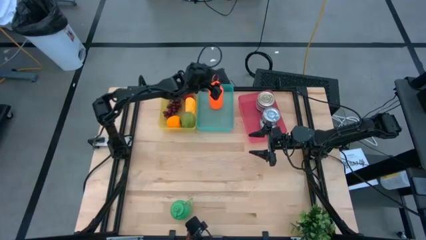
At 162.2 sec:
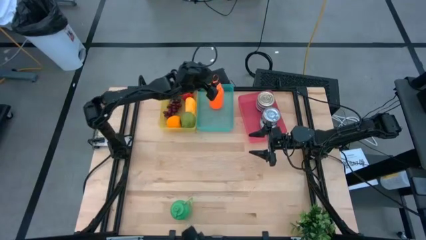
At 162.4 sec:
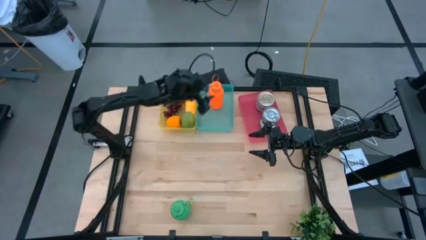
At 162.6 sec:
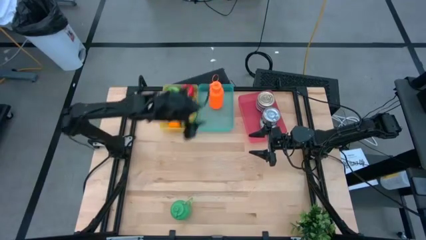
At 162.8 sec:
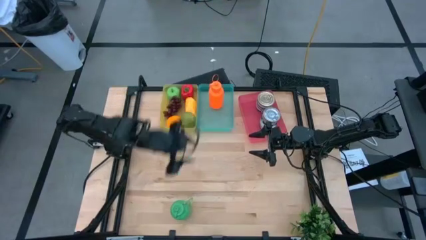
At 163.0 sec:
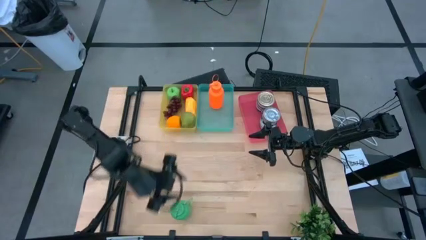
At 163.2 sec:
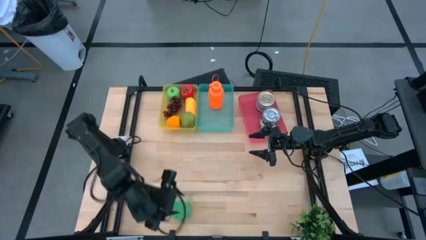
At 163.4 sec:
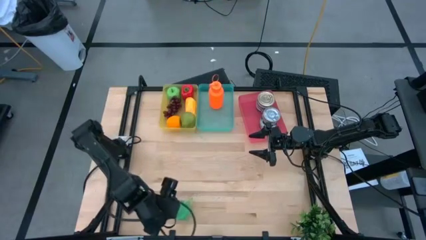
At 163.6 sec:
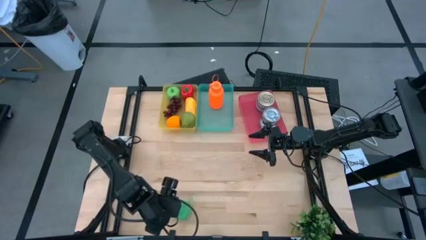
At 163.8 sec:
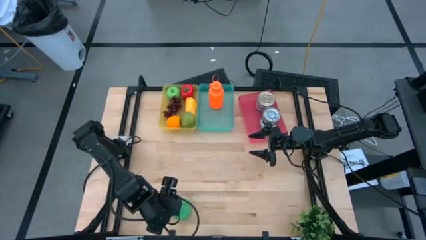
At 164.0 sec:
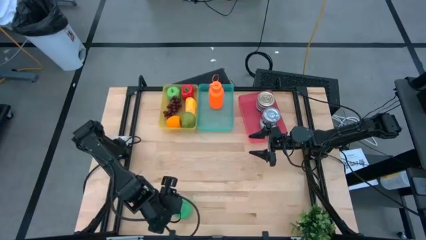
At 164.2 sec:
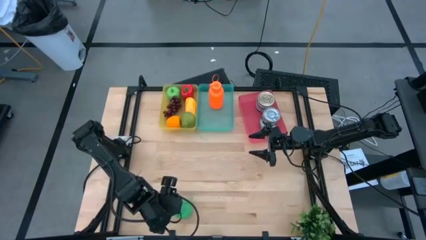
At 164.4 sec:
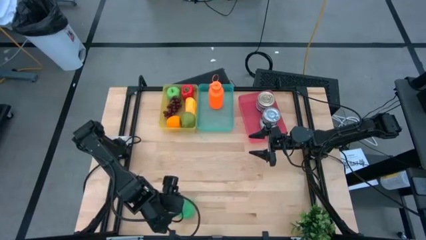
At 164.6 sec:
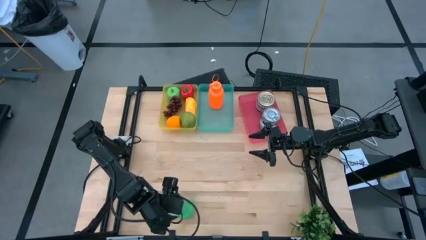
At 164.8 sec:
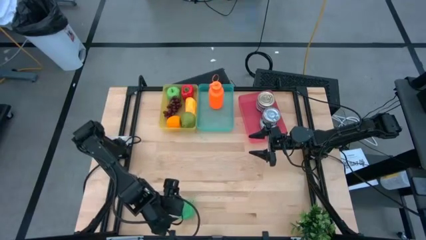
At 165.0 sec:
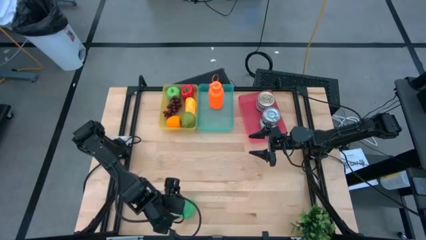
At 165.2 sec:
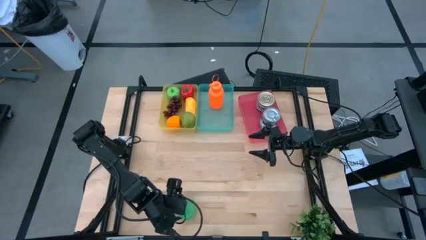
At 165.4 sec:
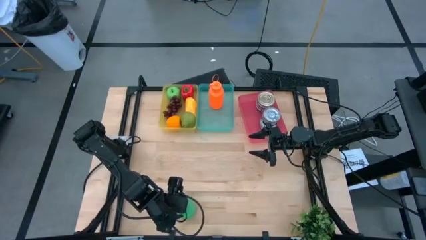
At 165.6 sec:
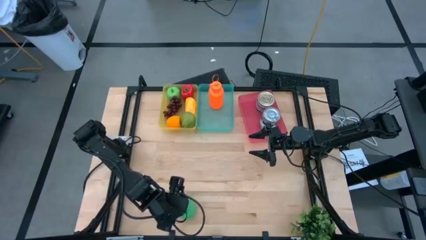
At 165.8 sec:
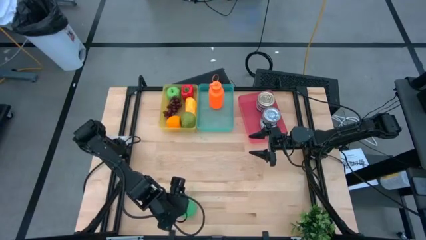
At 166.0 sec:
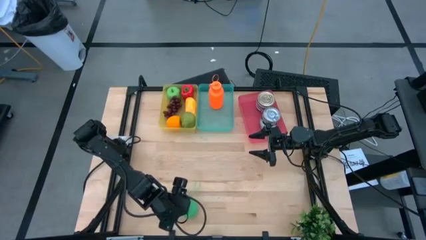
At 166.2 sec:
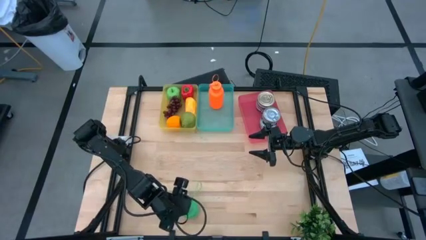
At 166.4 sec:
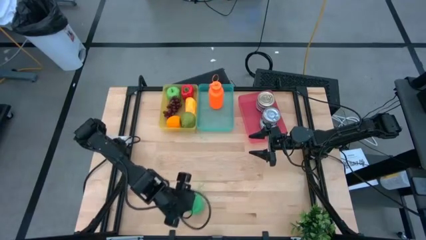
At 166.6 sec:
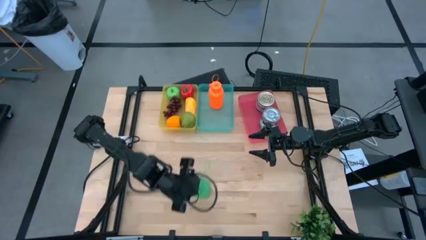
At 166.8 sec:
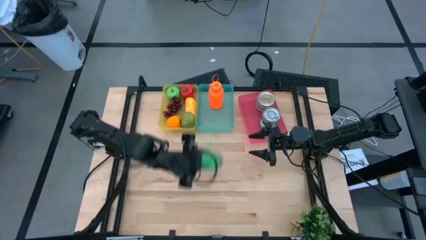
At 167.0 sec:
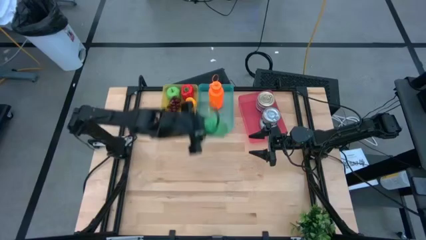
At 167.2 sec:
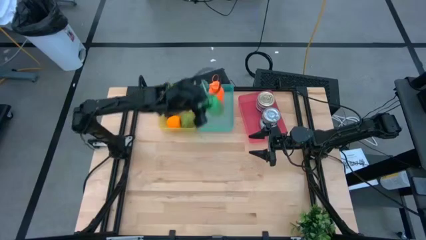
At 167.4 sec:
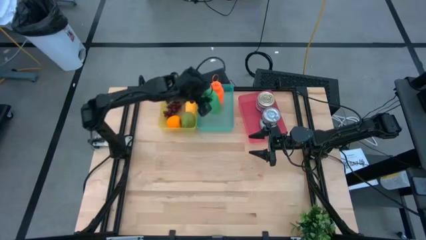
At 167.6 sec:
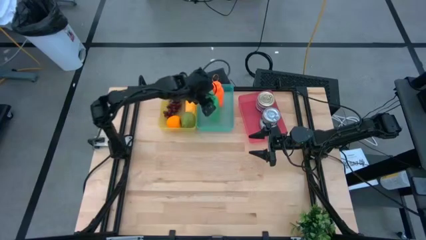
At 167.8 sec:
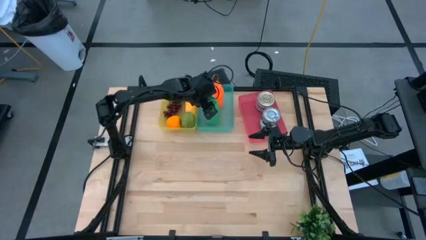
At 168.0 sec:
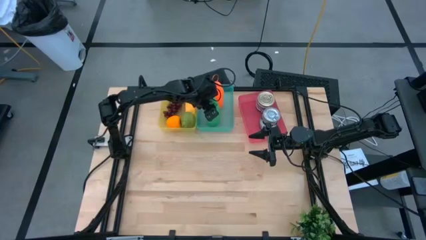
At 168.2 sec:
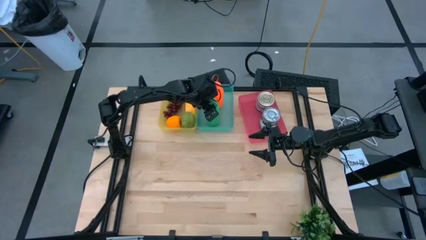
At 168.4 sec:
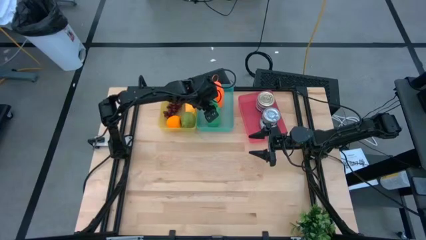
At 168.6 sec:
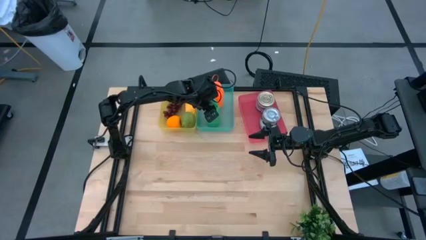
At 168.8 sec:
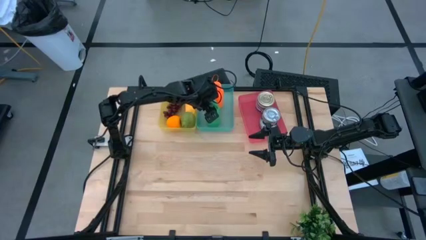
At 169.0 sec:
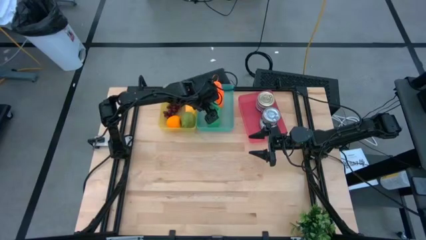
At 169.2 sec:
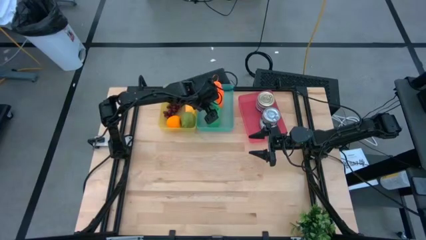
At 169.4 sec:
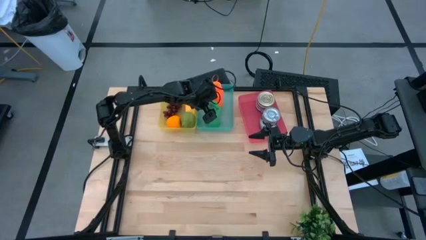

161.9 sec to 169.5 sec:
Task: Pick & Place Food Item
Put the green tumbler into the green bin

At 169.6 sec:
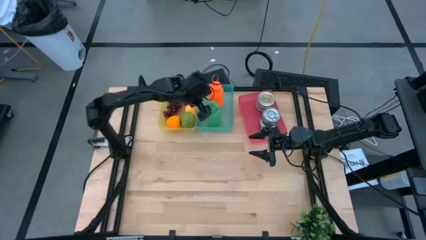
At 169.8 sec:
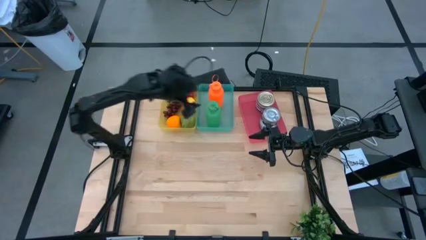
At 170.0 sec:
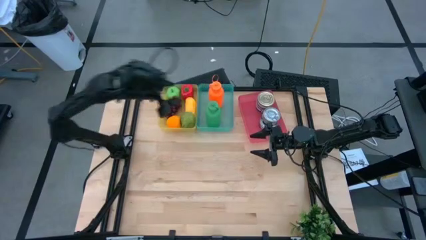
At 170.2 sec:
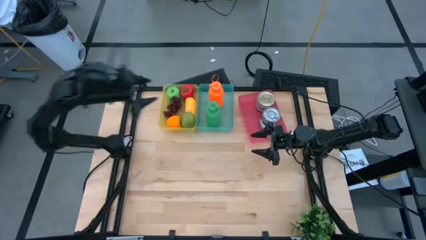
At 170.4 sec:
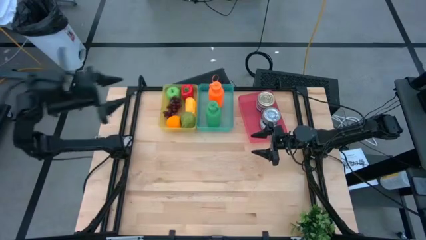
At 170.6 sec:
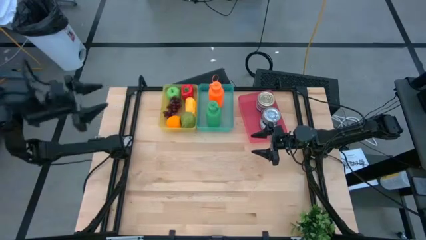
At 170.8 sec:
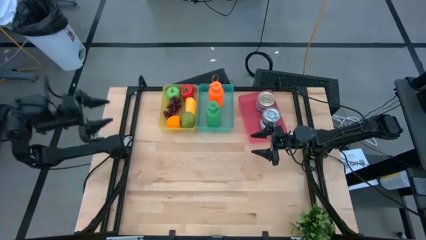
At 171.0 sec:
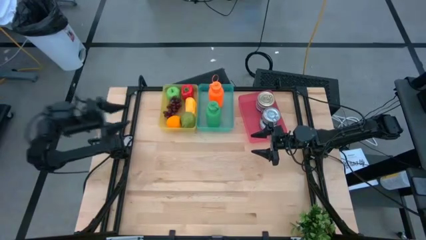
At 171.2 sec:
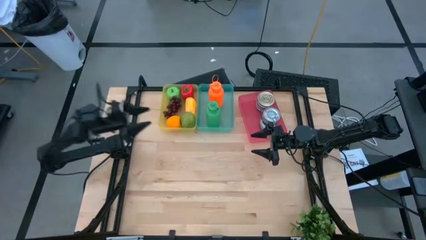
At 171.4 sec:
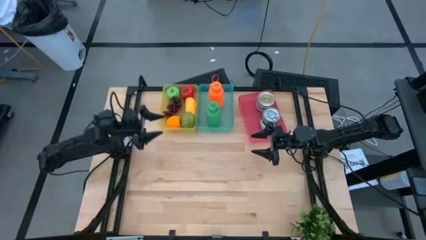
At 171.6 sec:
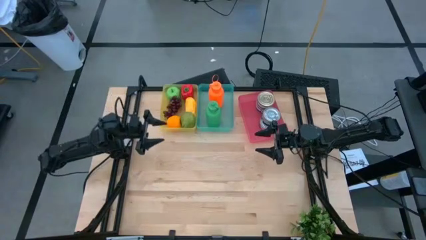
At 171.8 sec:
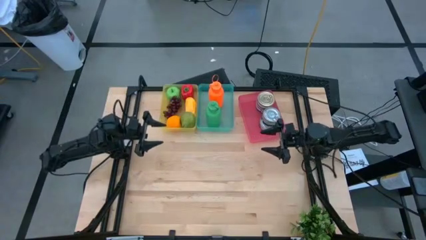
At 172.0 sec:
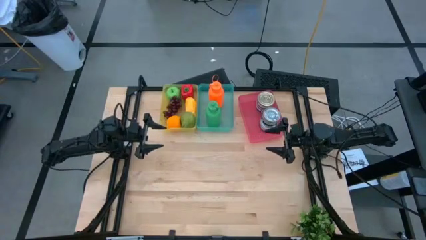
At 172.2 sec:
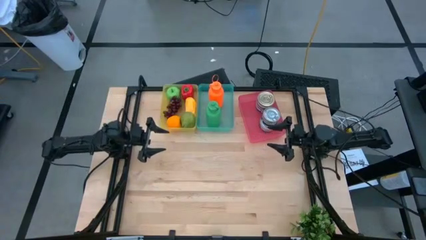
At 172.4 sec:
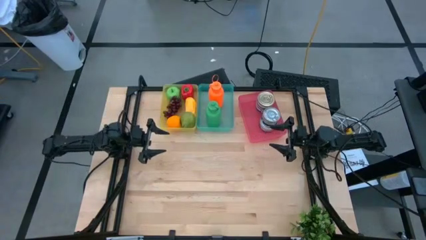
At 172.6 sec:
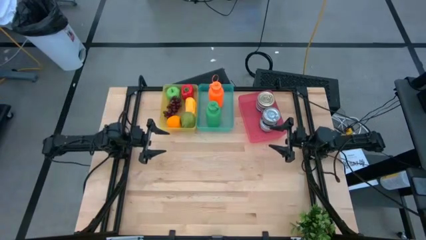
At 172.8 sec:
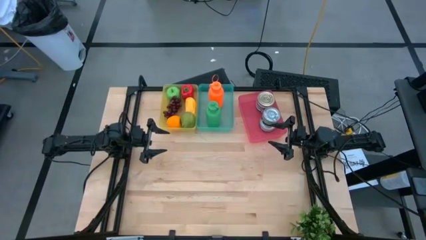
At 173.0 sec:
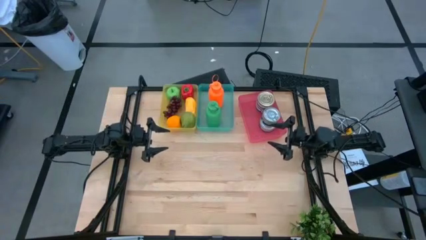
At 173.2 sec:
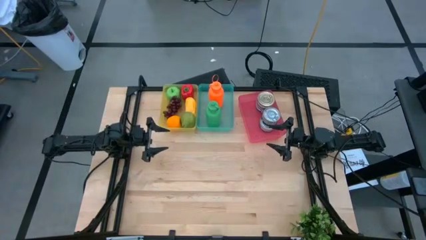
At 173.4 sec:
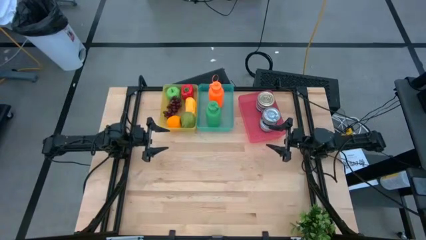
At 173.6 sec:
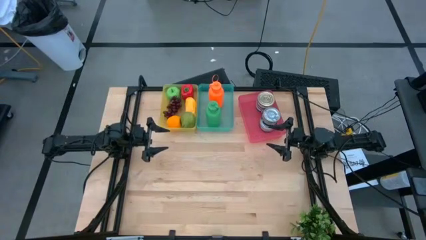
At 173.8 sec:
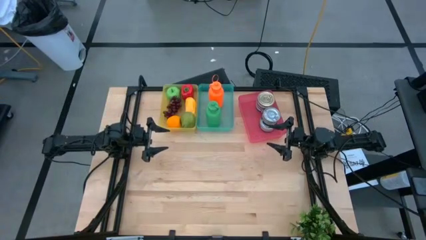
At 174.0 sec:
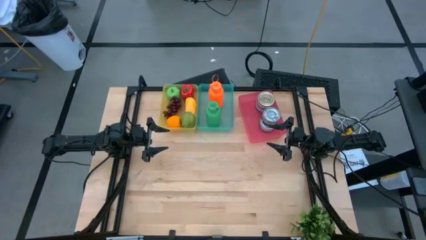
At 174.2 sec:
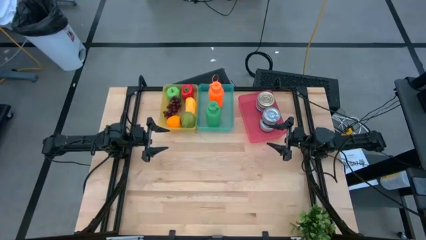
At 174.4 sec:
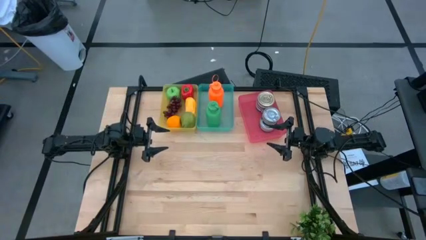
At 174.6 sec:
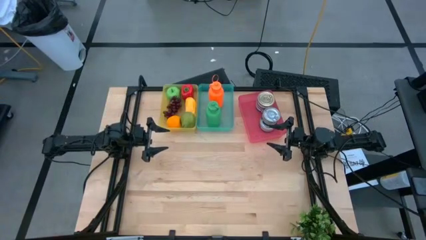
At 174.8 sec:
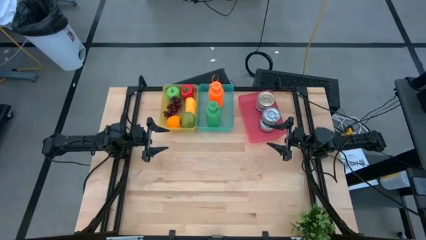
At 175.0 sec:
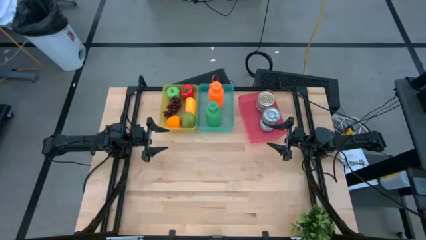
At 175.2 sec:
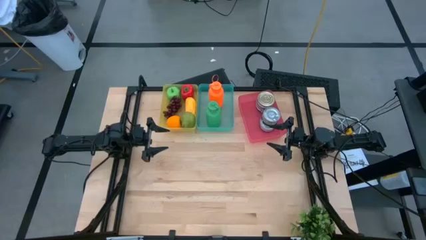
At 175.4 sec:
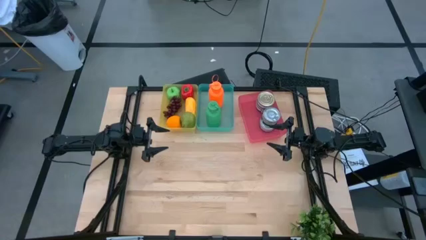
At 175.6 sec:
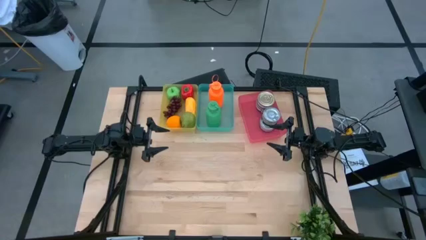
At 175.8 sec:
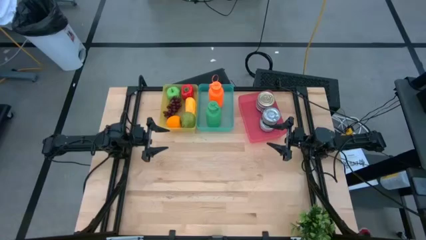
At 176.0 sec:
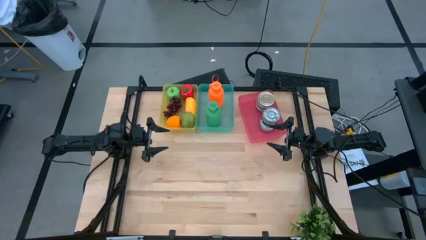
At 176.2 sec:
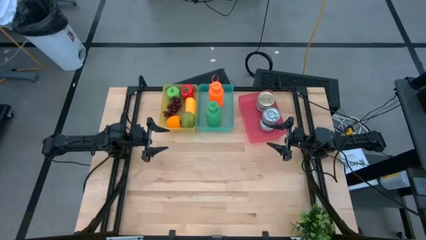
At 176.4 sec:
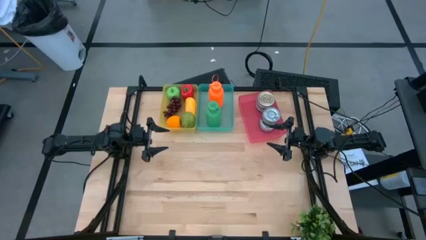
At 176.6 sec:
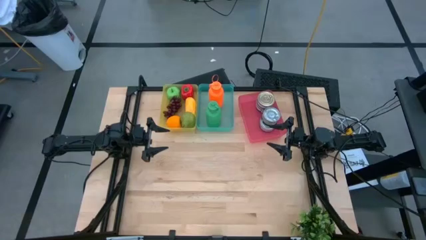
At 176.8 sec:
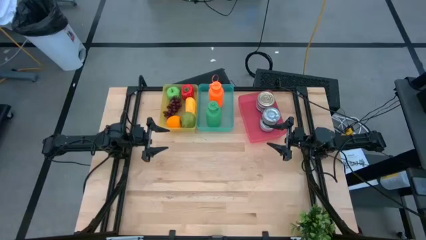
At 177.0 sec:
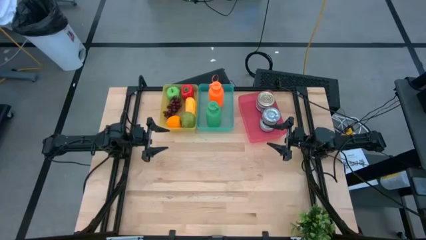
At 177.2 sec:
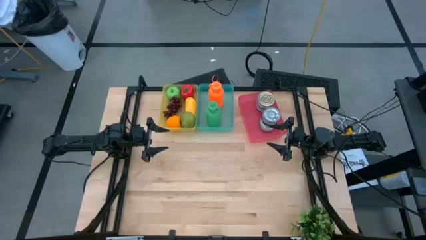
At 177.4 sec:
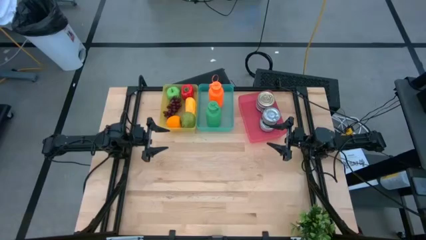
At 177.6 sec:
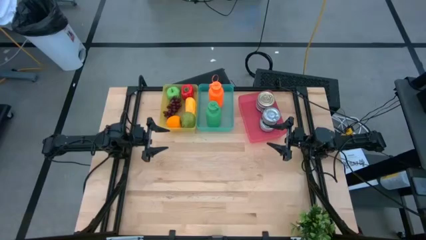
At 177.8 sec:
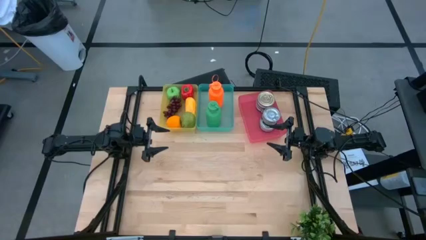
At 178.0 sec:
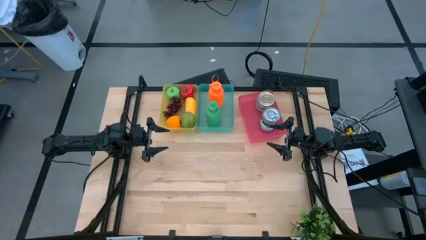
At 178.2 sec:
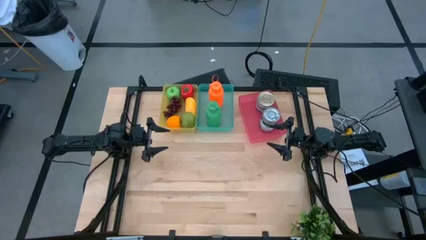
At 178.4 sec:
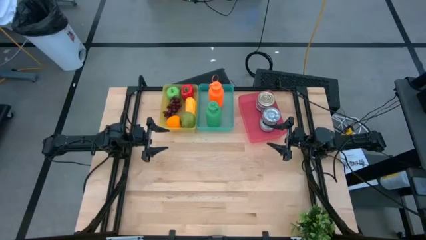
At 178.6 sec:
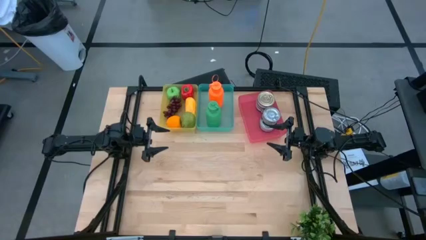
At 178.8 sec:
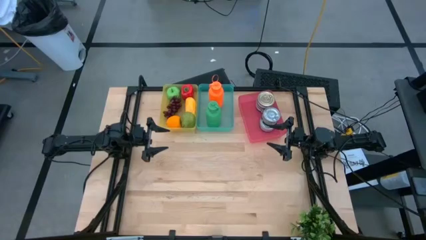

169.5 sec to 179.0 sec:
Return to Home Position
